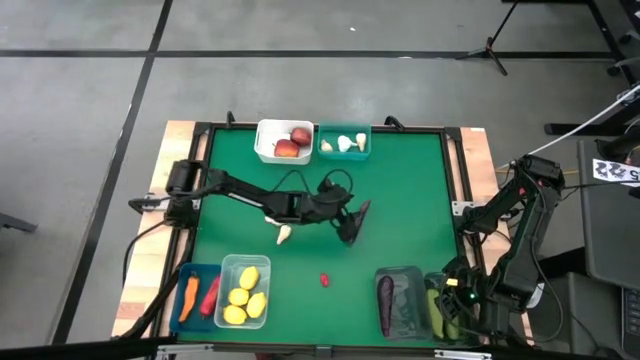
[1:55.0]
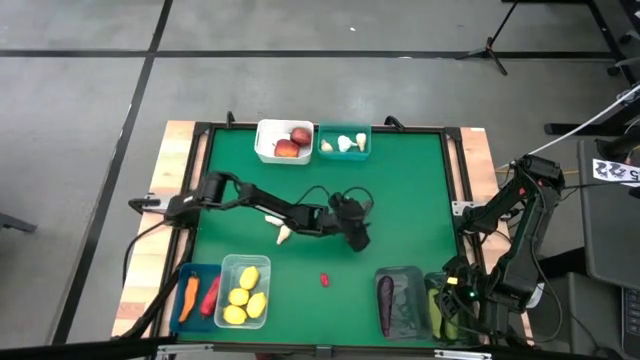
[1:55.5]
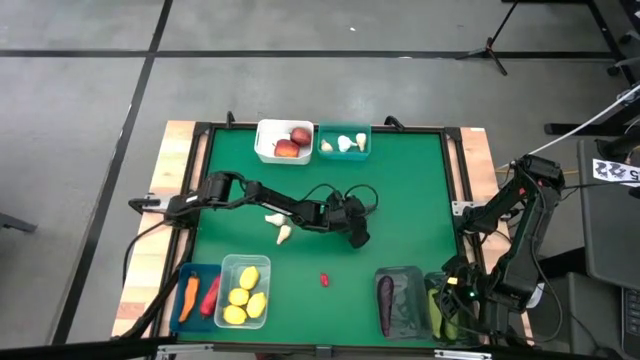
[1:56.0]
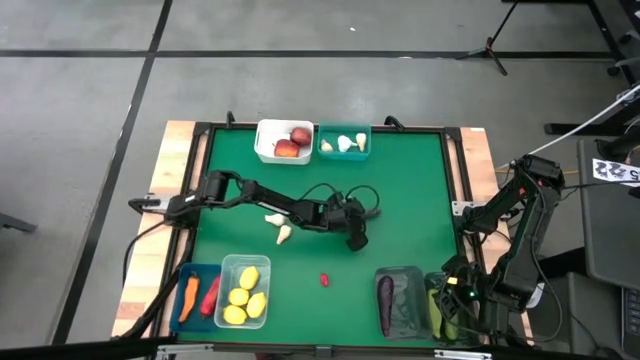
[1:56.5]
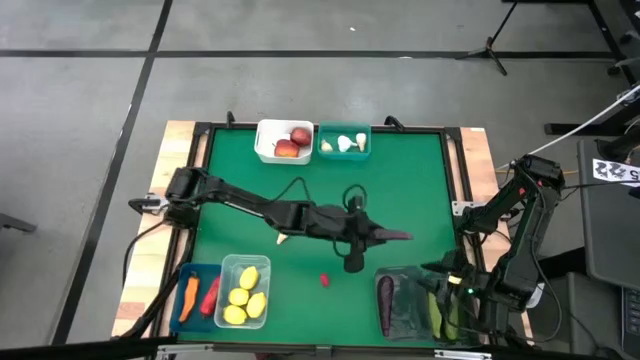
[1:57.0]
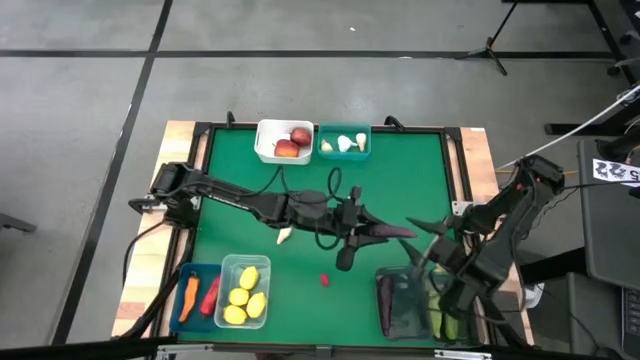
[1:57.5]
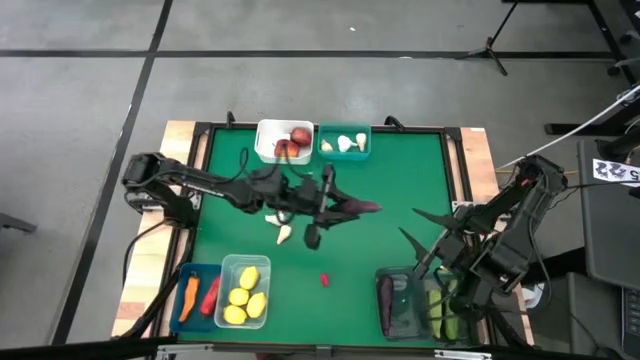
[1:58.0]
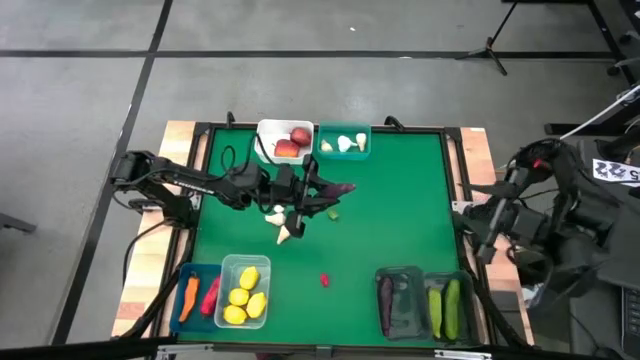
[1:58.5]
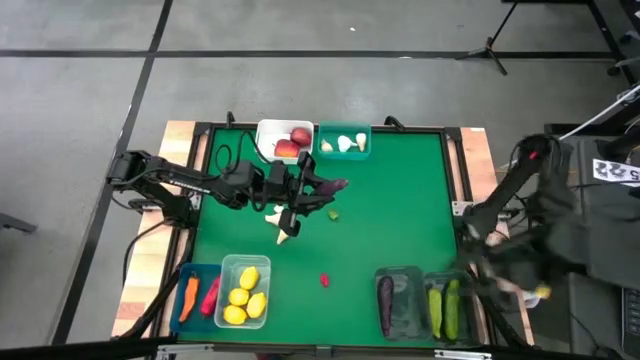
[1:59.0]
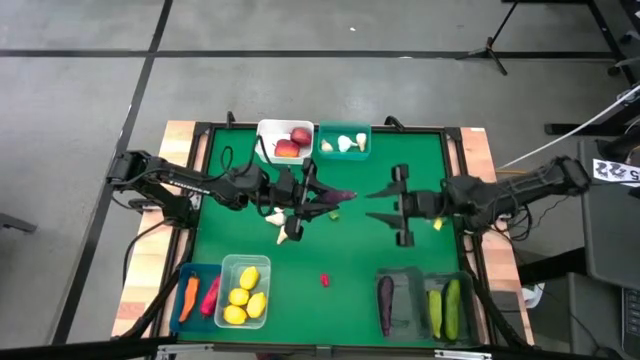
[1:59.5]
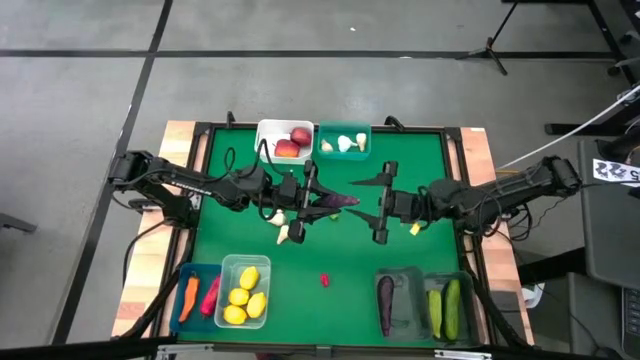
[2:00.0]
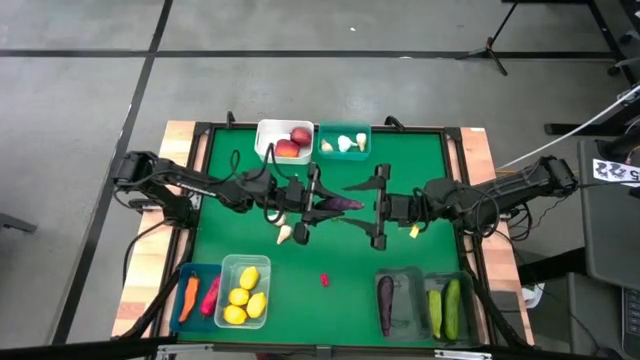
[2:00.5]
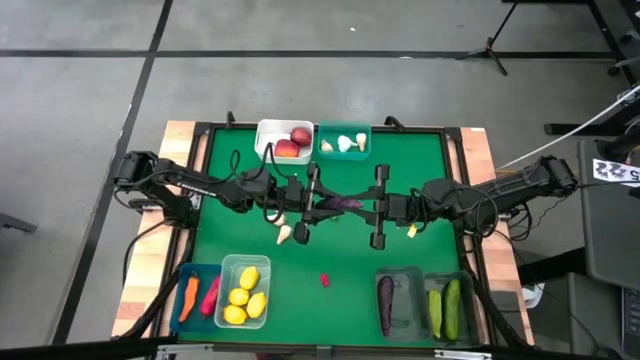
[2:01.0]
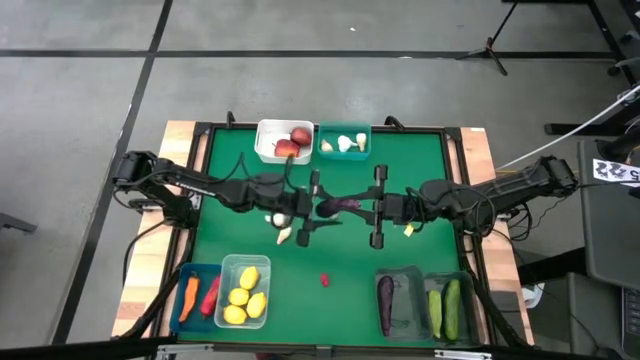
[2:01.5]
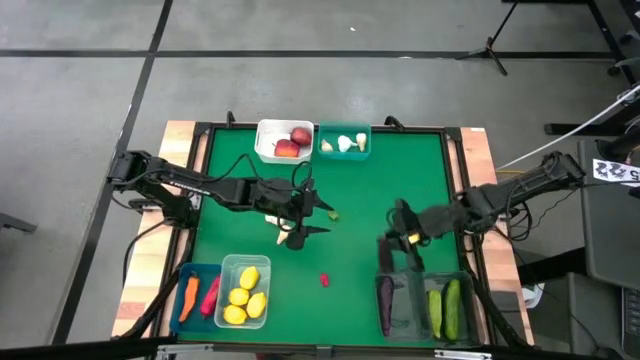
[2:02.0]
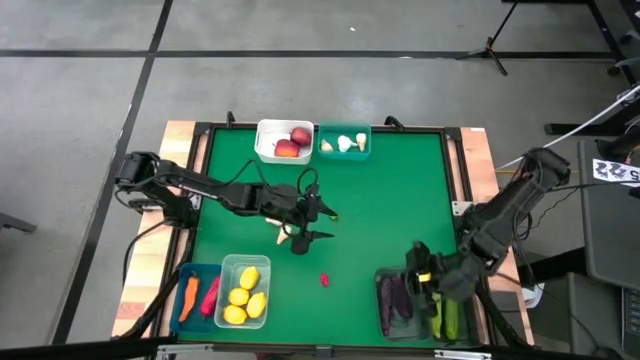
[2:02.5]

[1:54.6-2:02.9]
Task: Sort produce into baskets
Put the eggplant into the left black bin

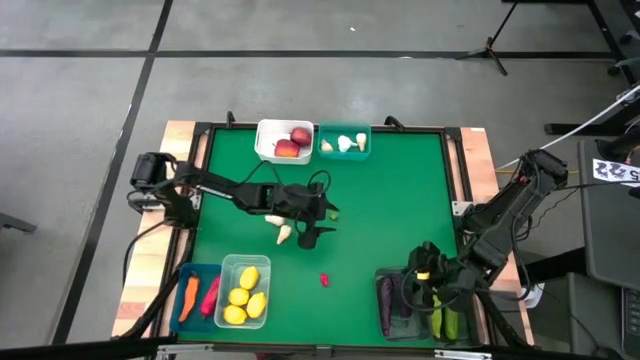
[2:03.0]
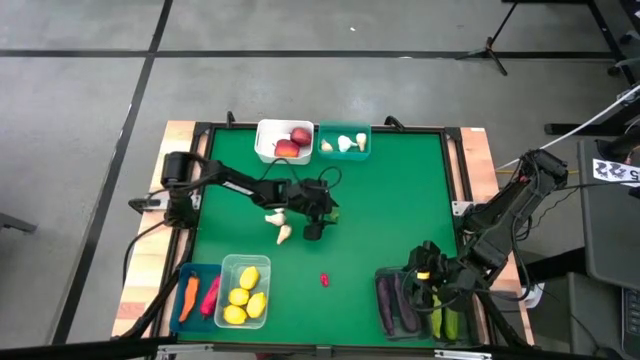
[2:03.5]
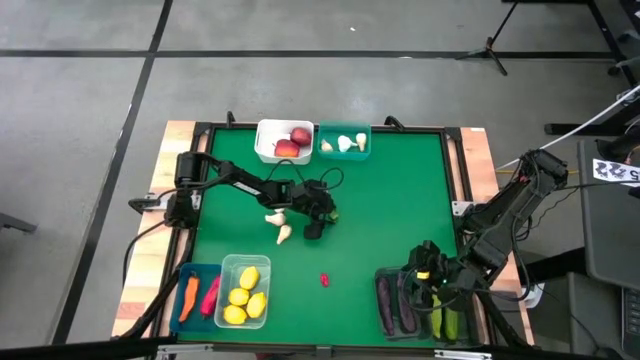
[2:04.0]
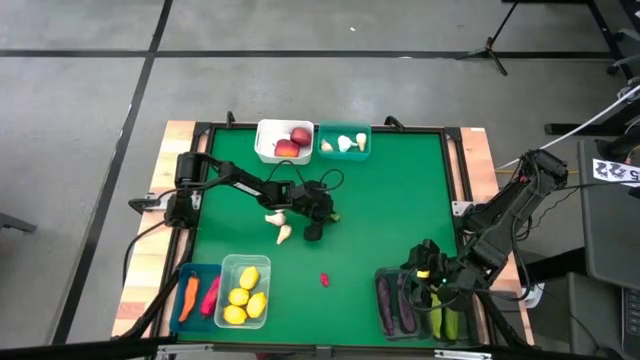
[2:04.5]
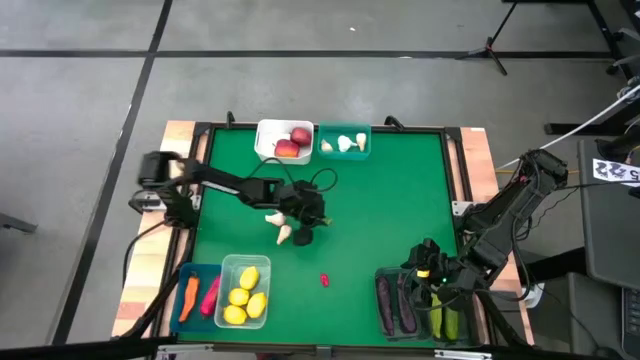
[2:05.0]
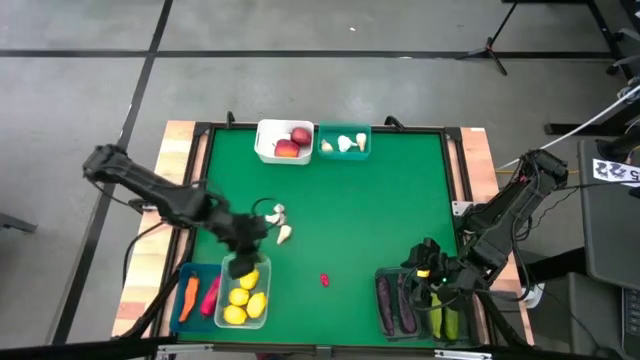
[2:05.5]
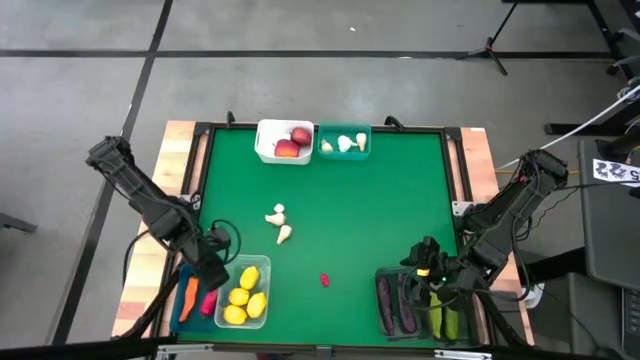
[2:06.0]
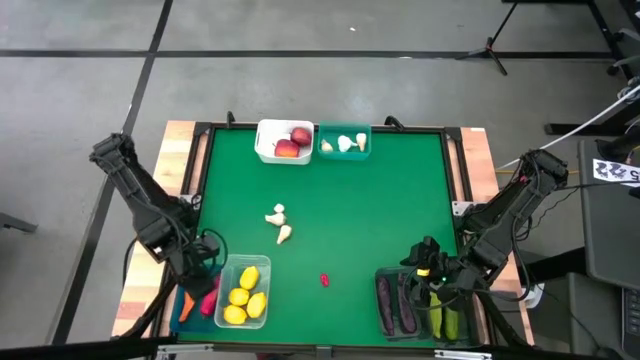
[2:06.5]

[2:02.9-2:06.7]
Put the green chili pepper into the blue bin

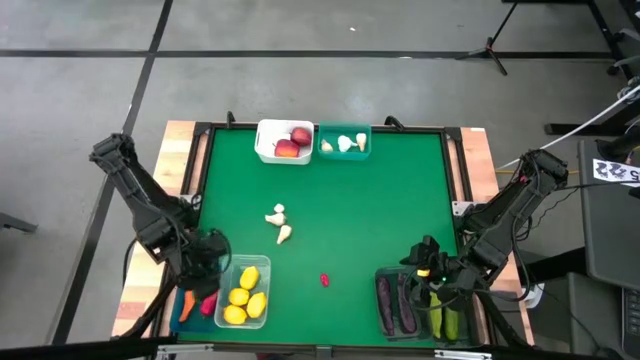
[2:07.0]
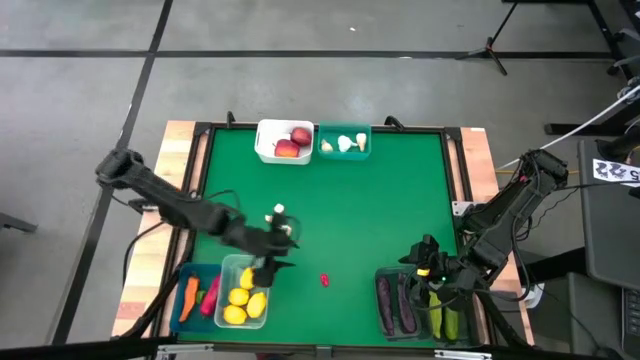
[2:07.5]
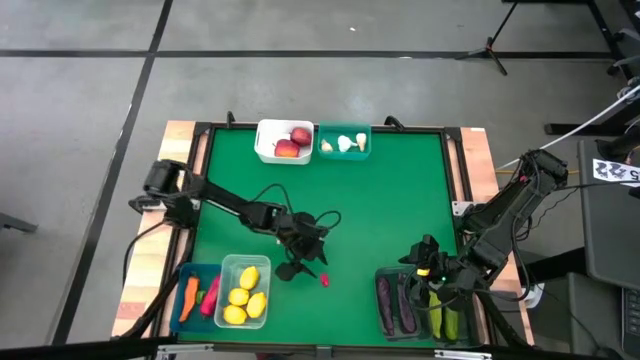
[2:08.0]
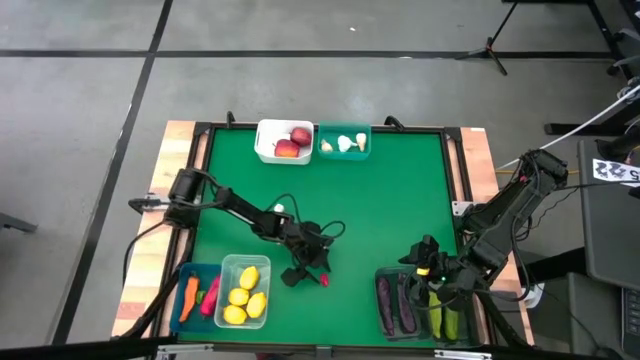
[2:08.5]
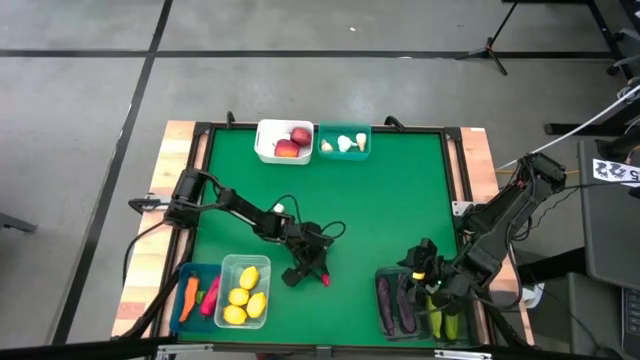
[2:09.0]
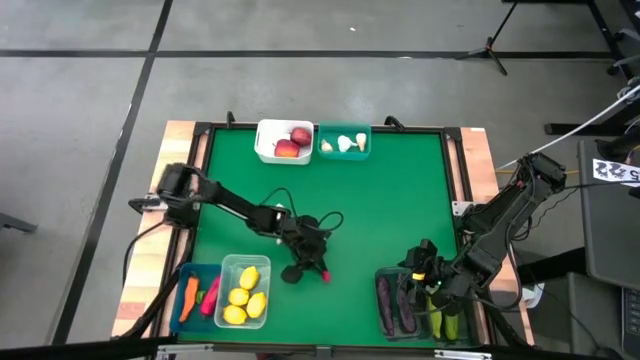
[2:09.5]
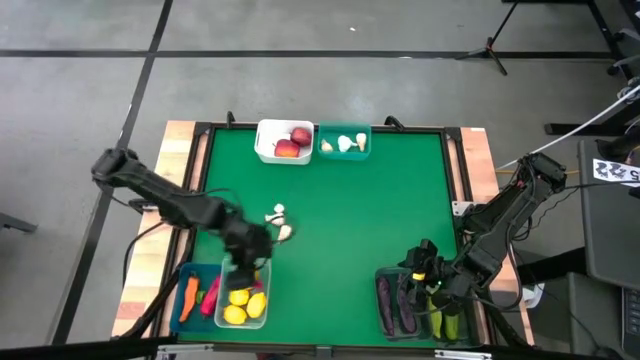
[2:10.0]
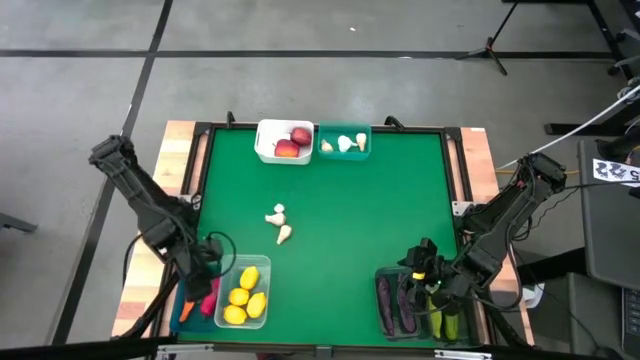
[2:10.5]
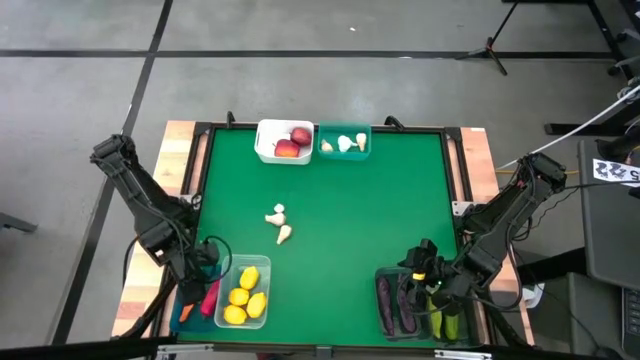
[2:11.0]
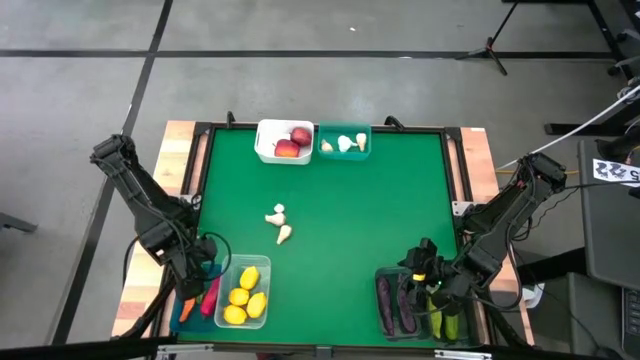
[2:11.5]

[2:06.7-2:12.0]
Put the red chili pepper into the blue bin

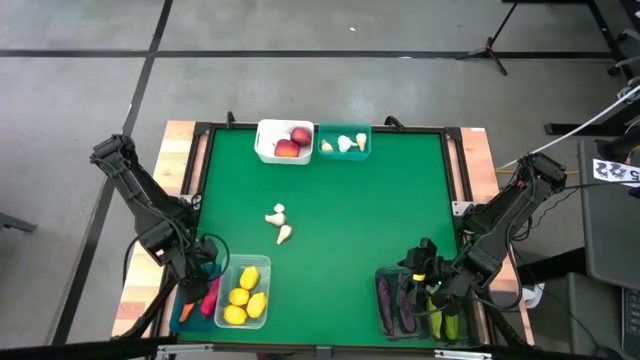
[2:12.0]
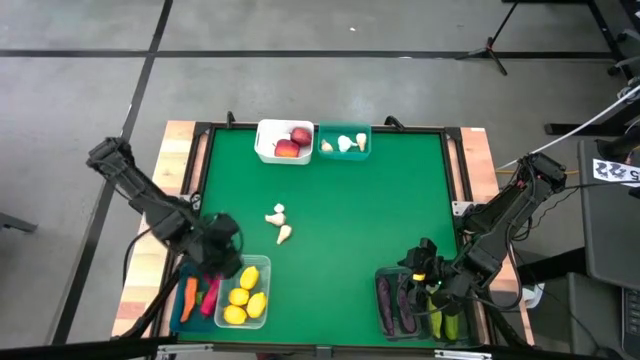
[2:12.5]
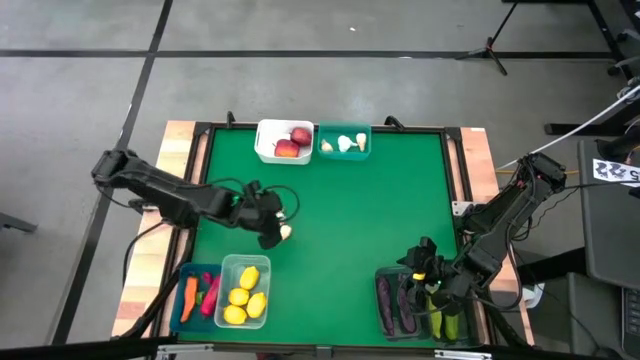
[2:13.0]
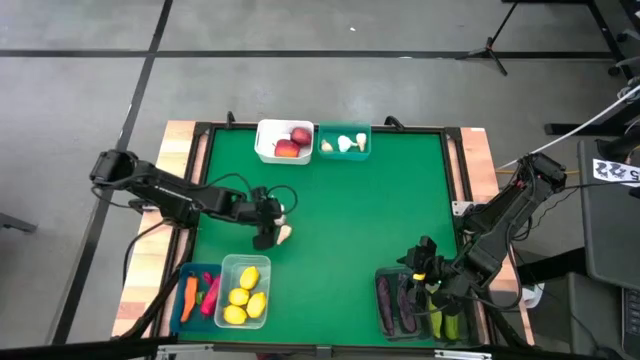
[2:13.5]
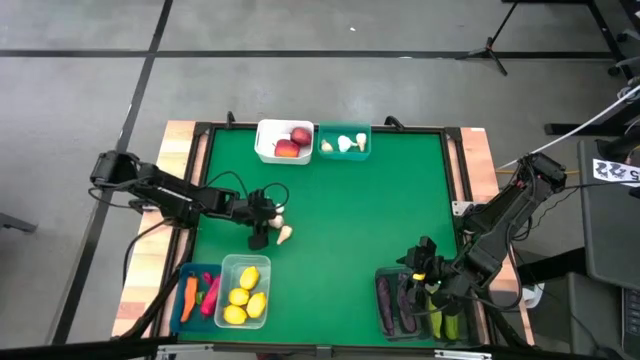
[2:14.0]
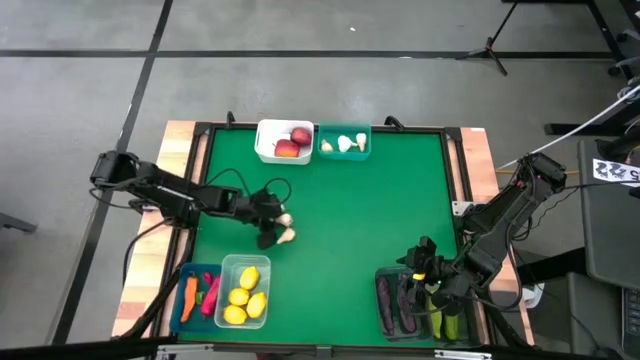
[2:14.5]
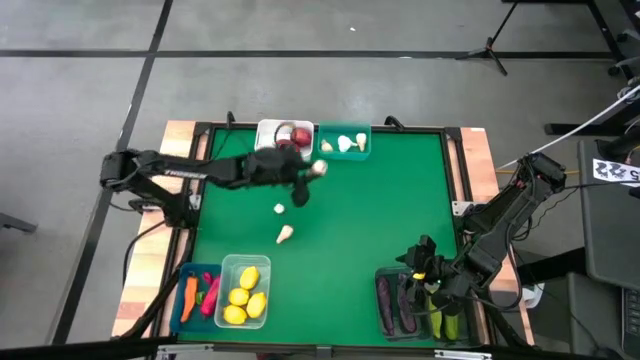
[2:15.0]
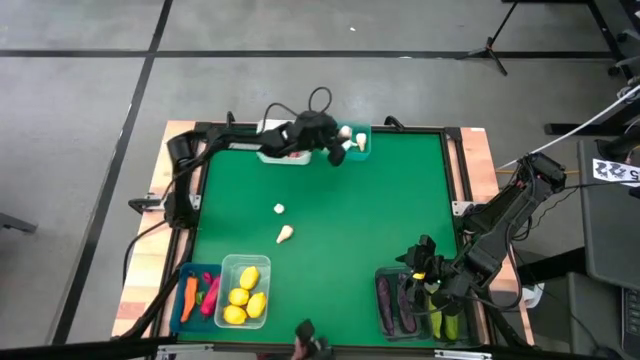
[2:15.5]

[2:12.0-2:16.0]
Put the white garlic into the green bin

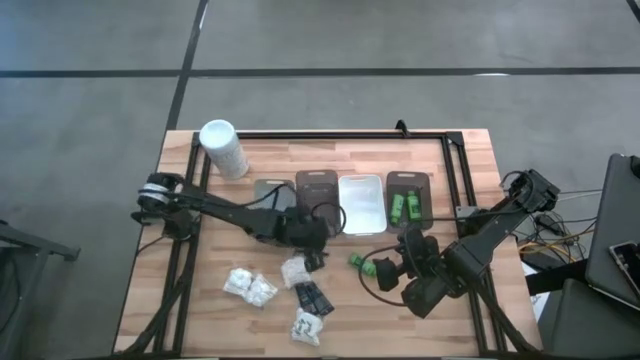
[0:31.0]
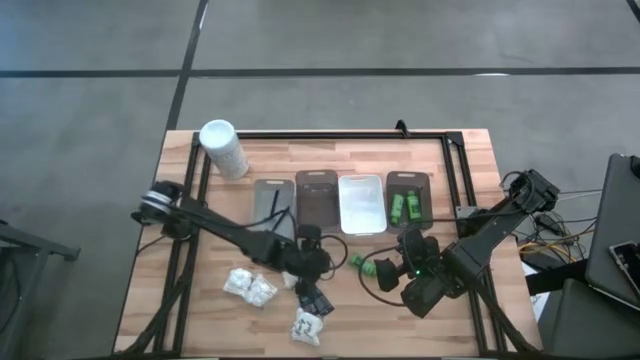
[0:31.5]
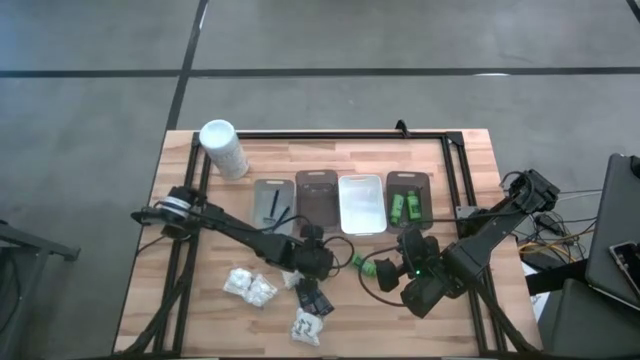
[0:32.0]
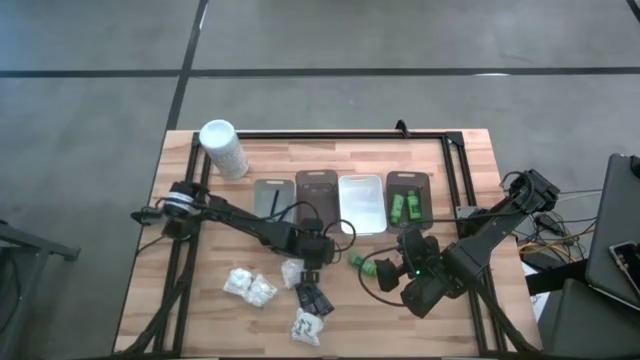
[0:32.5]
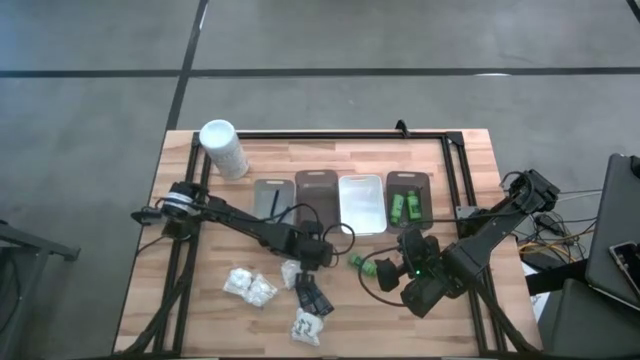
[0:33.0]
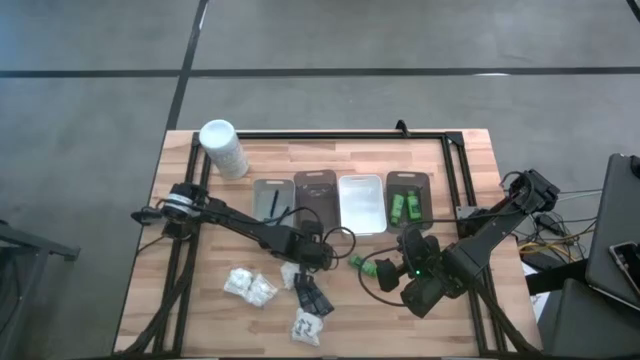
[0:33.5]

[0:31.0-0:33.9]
Task: Pick & Place Travel size toiletries
Put the blue razor into the gray bin
